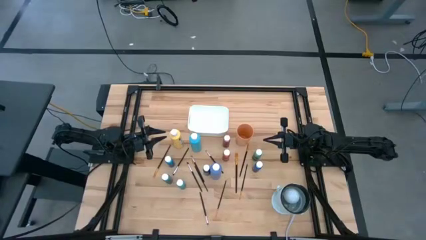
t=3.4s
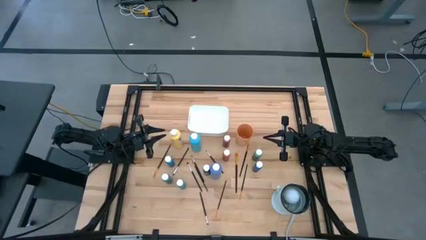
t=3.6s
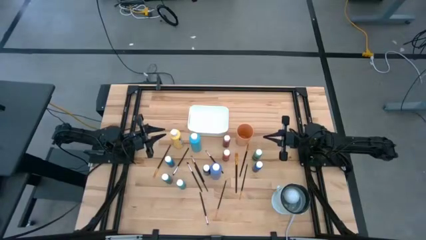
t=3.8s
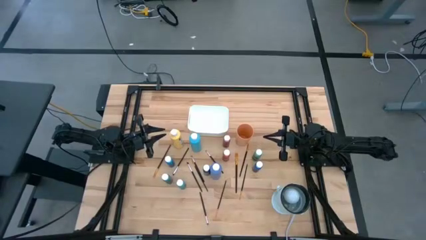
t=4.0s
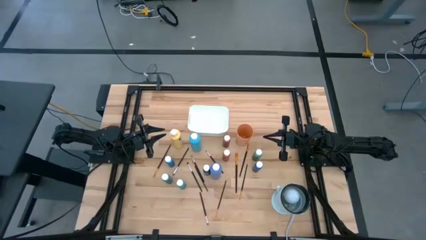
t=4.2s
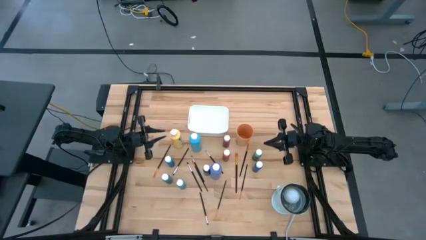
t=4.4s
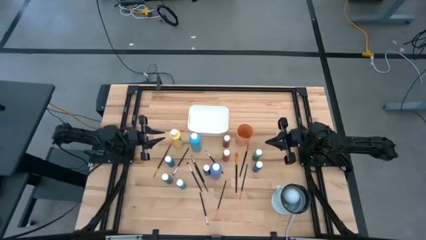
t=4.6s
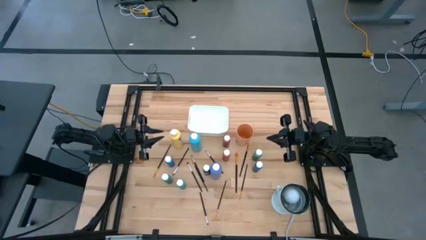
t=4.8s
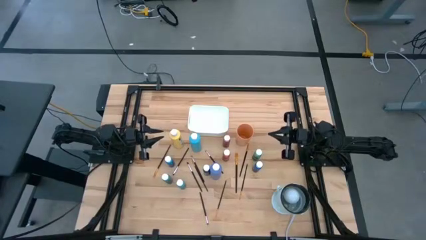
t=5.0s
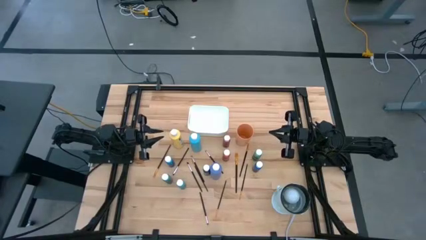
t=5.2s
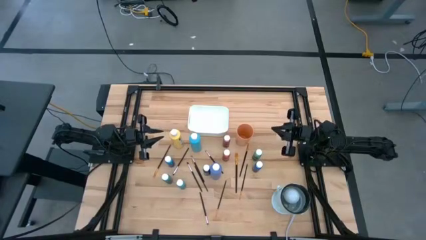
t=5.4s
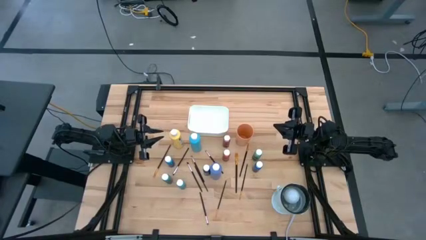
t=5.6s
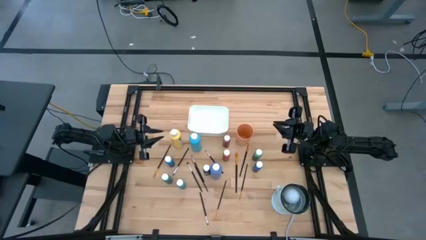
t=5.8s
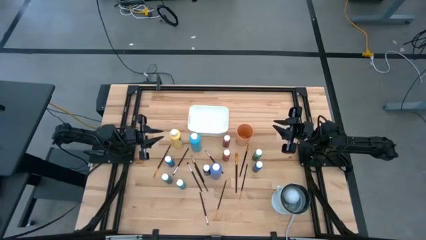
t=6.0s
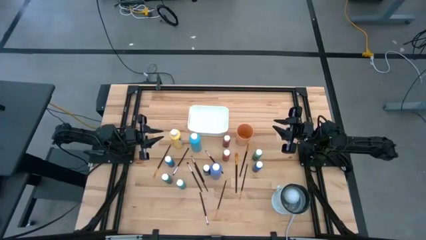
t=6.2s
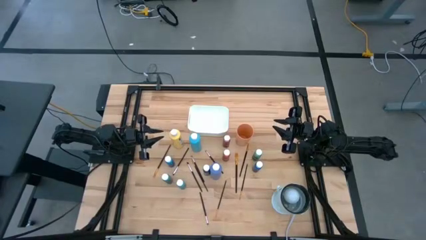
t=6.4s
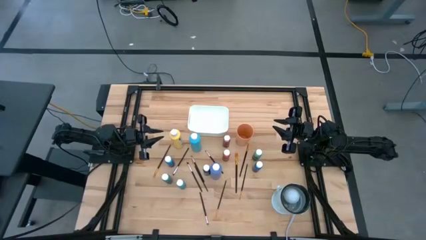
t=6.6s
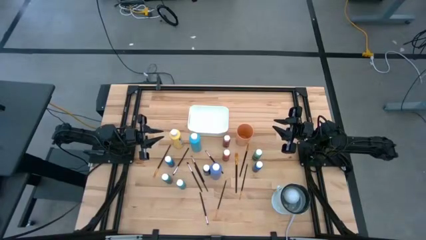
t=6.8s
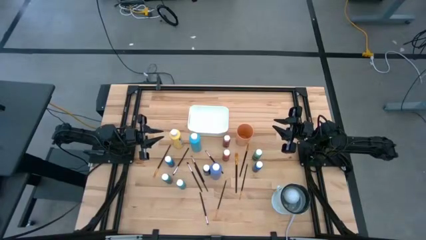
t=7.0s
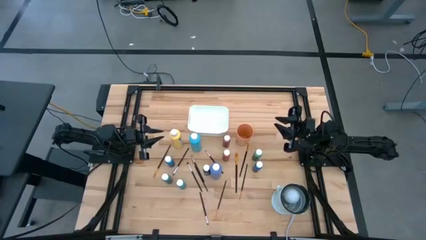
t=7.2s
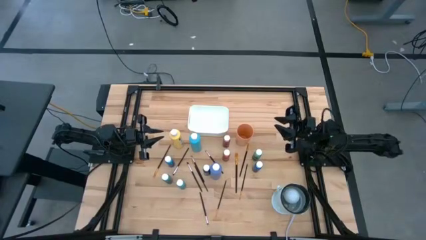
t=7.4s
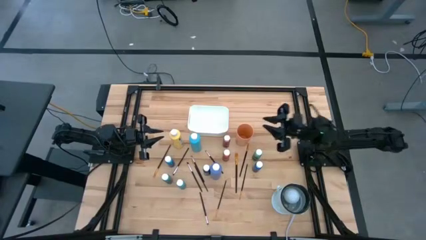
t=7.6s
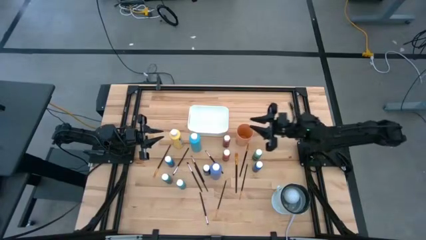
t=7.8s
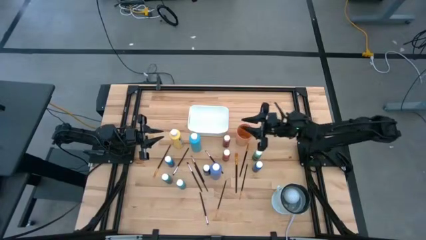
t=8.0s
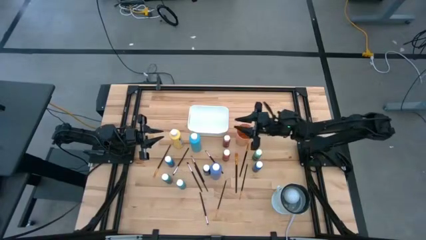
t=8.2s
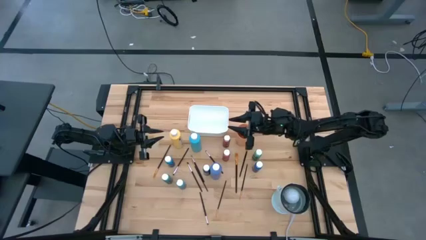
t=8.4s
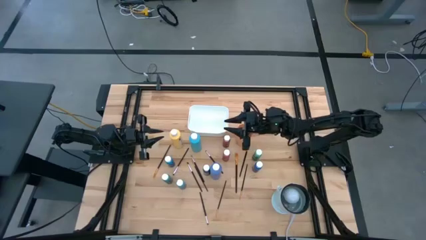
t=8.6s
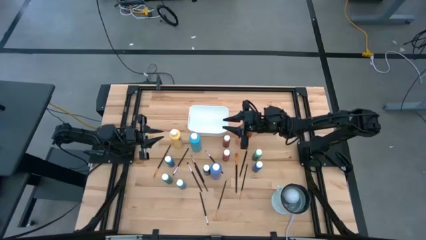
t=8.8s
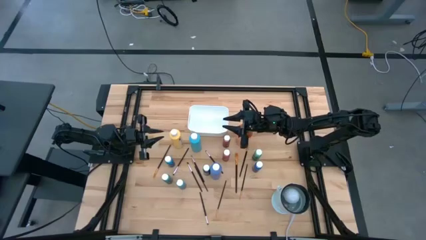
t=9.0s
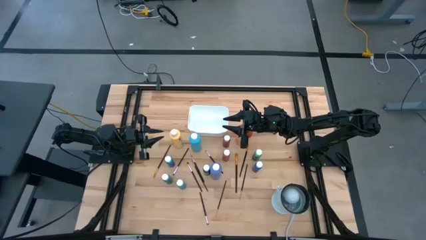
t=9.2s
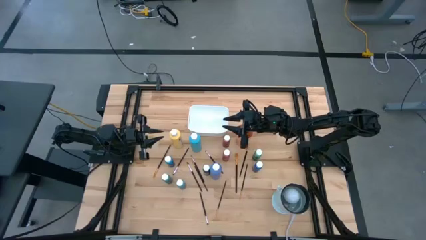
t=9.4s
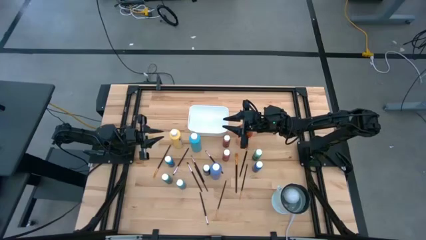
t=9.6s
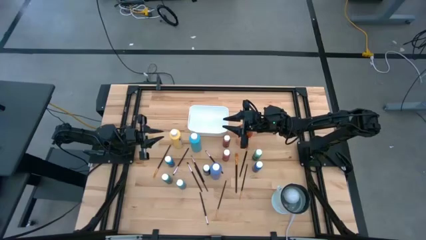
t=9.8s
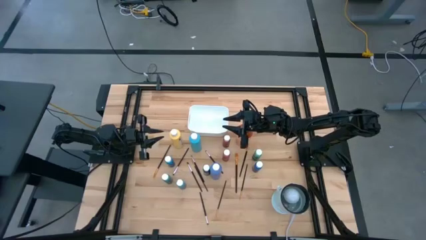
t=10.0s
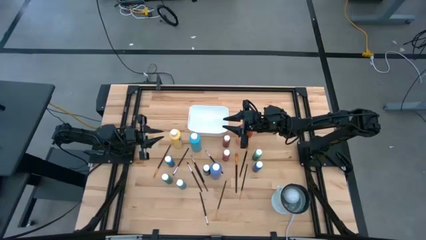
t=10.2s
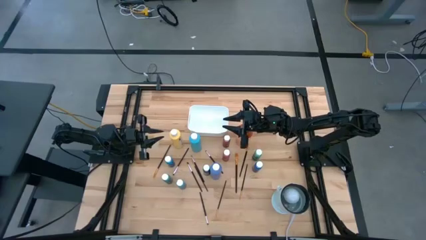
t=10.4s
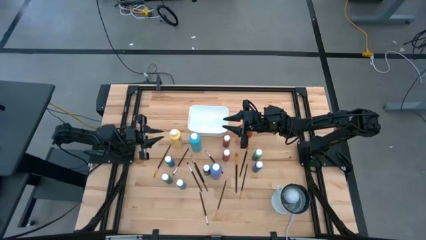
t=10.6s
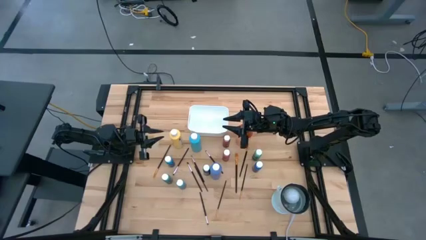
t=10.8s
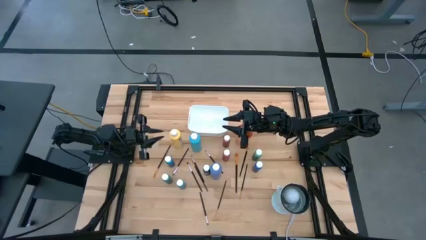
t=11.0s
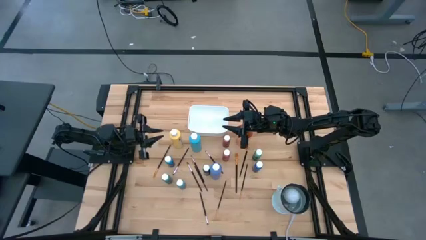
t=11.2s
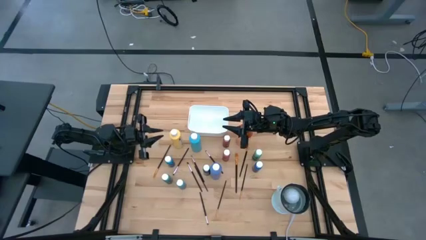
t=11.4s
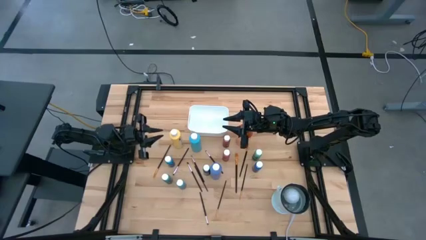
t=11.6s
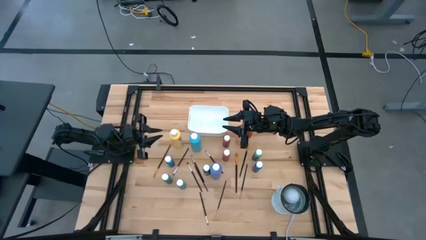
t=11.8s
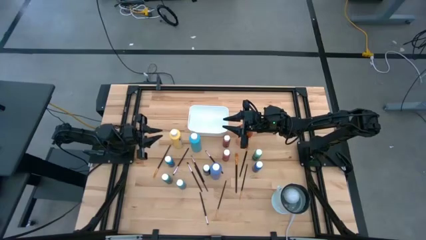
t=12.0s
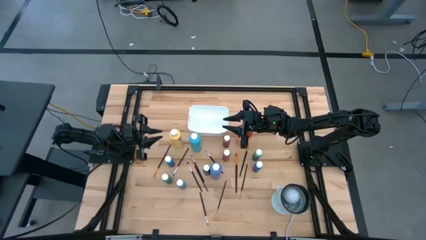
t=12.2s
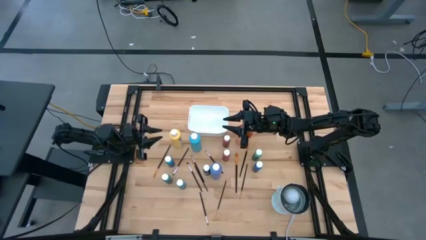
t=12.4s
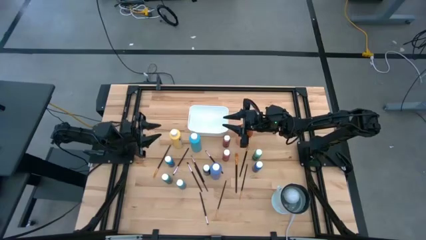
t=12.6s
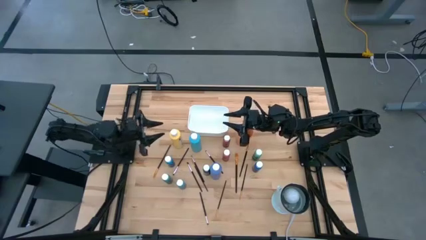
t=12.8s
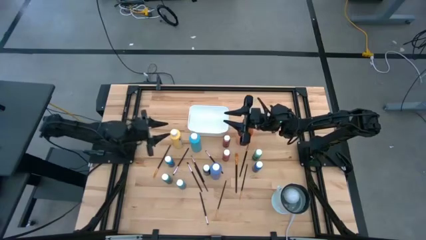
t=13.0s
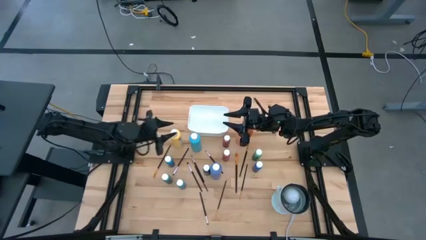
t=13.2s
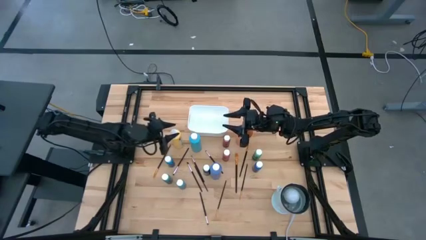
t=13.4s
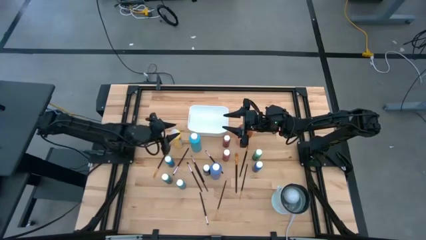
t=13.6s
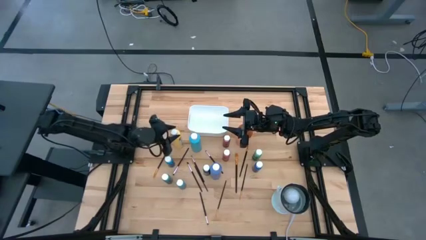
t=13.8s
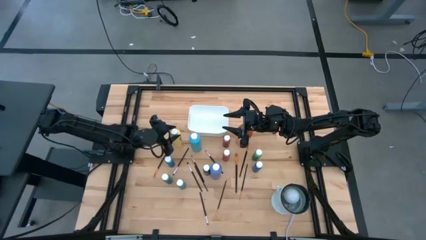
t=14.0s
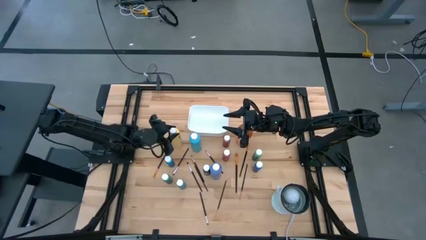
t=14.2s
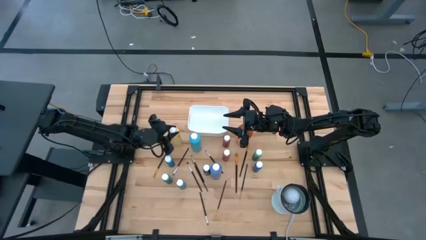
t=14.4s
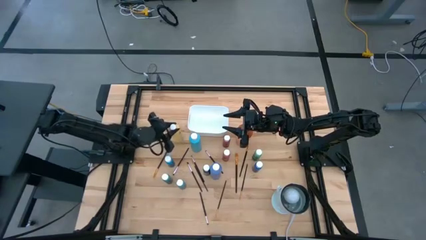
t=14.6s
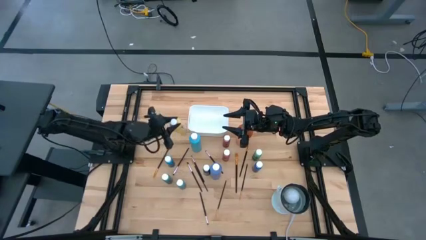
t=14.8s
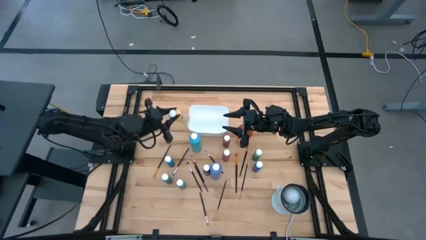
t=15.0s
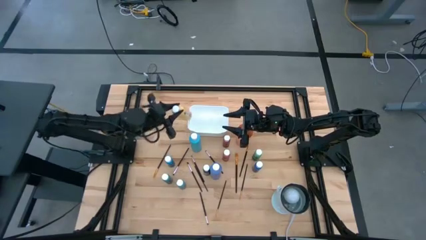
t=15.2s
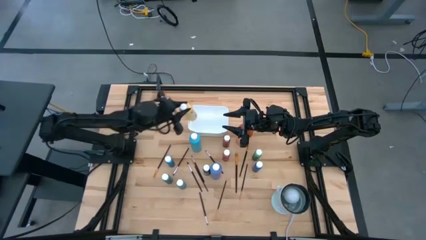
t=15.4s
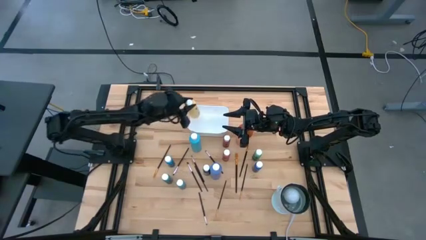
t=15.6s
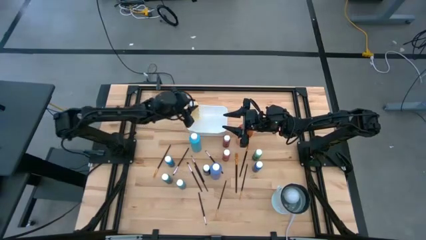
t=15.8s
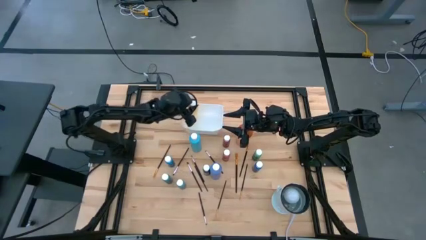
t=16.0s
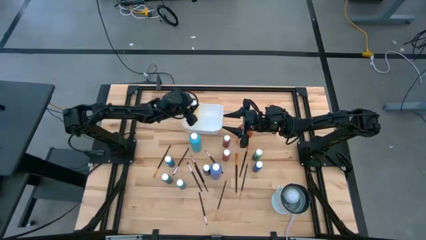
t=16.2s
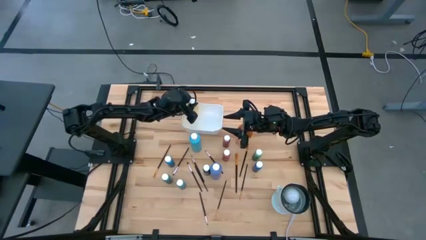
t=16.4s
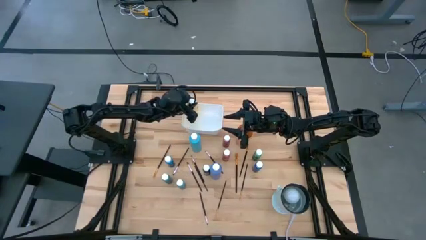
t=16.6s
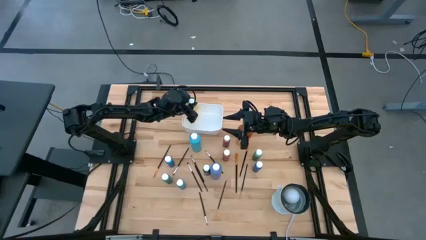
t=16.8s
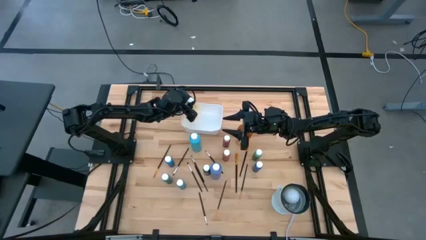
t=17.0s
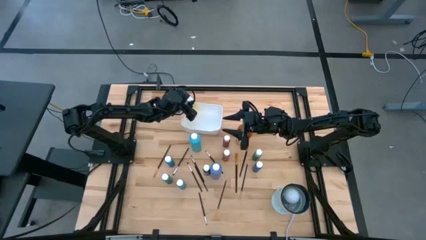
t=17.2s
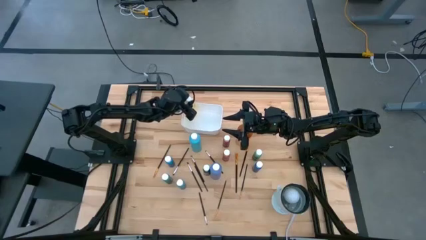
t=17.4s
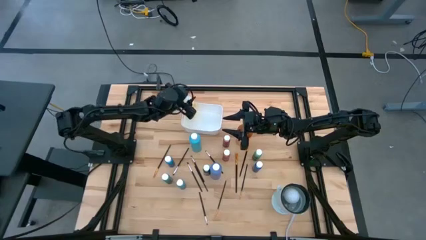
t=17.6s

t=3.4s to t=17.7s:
Task: Pick & Place Paint Supplies
Put the large yellow paint bottle into the bin
